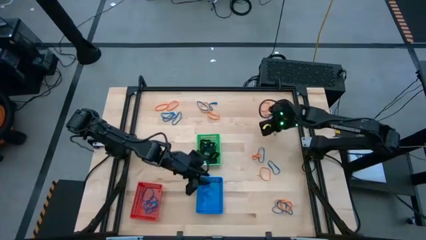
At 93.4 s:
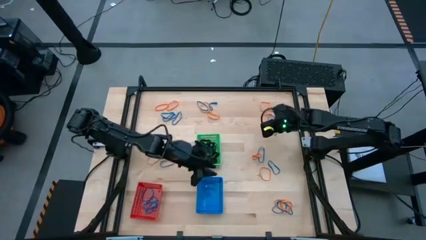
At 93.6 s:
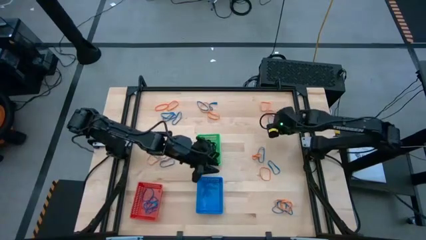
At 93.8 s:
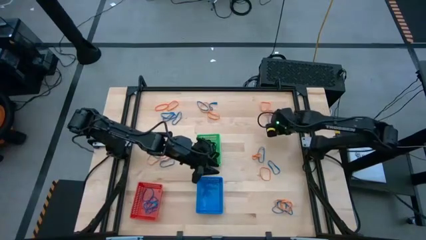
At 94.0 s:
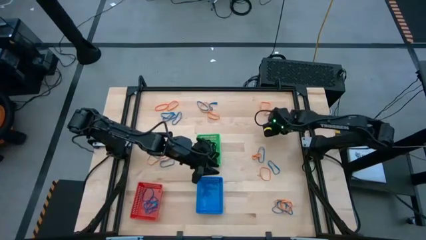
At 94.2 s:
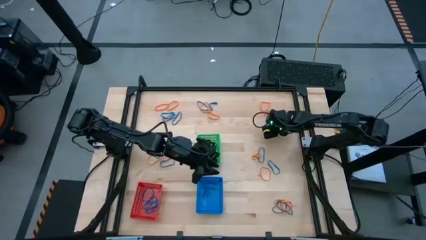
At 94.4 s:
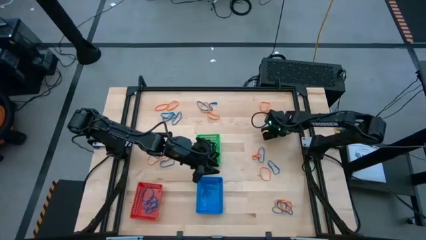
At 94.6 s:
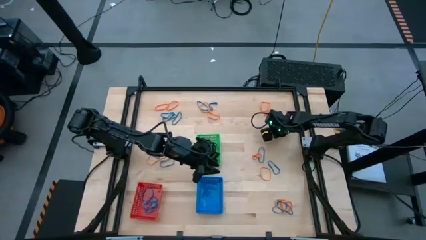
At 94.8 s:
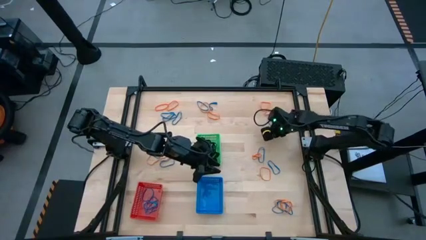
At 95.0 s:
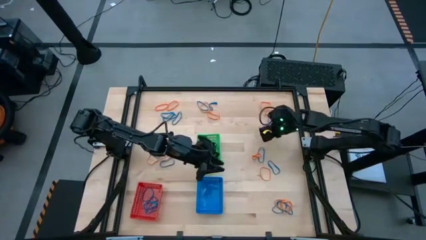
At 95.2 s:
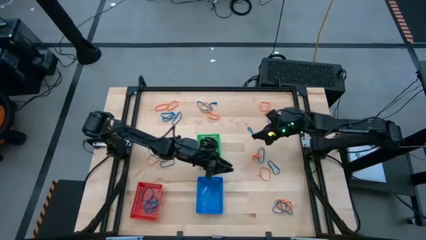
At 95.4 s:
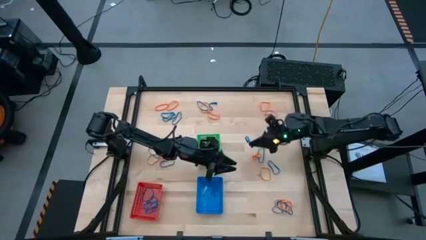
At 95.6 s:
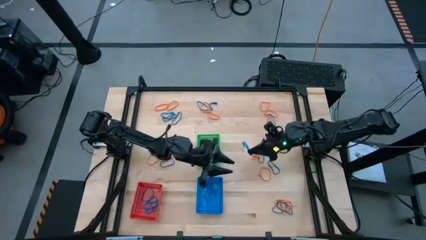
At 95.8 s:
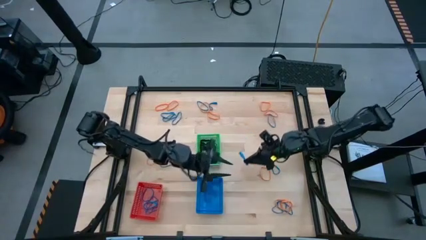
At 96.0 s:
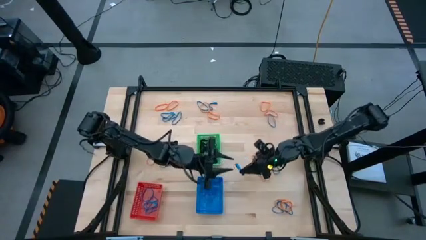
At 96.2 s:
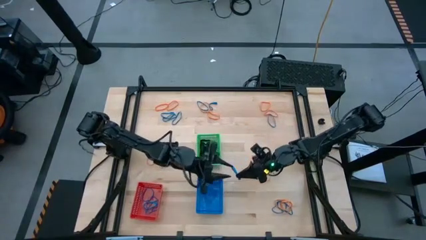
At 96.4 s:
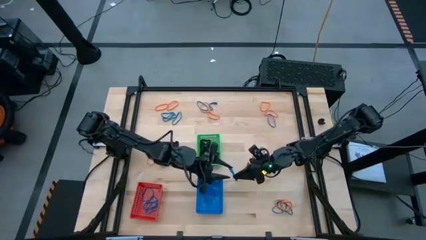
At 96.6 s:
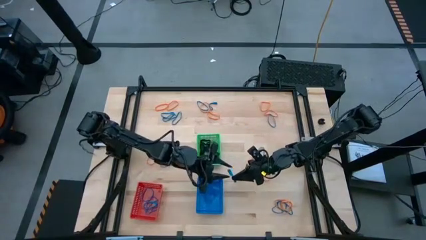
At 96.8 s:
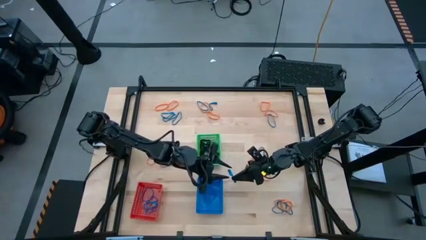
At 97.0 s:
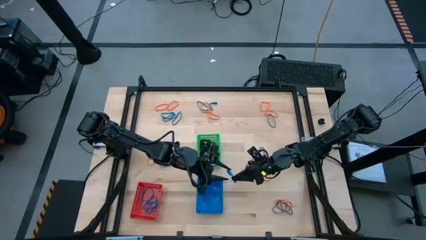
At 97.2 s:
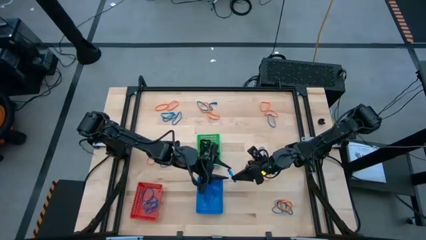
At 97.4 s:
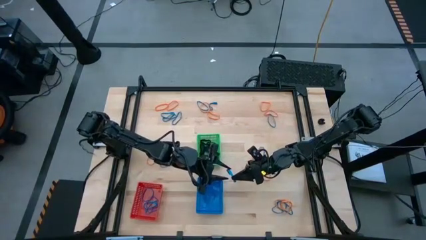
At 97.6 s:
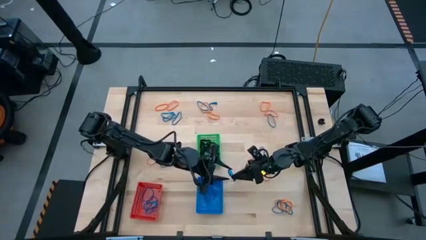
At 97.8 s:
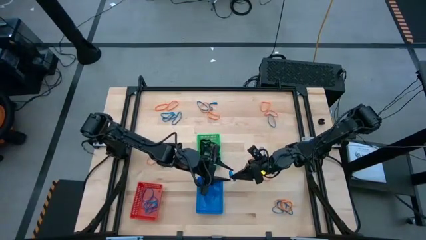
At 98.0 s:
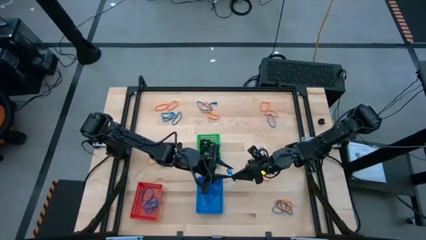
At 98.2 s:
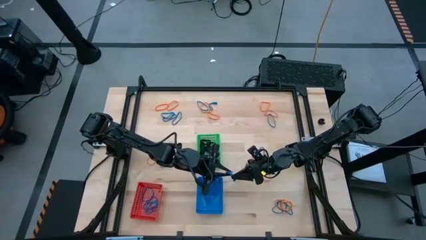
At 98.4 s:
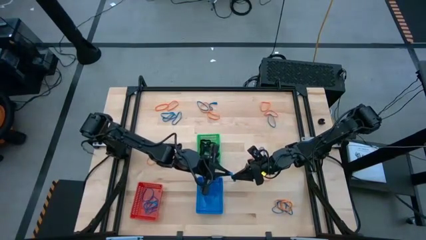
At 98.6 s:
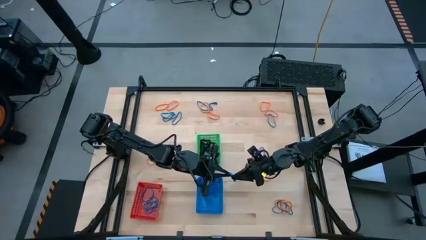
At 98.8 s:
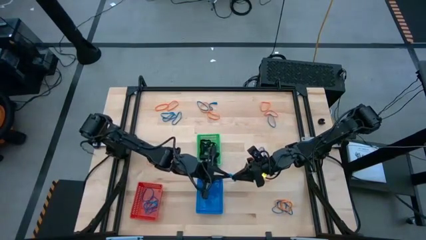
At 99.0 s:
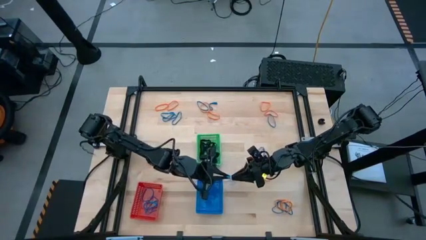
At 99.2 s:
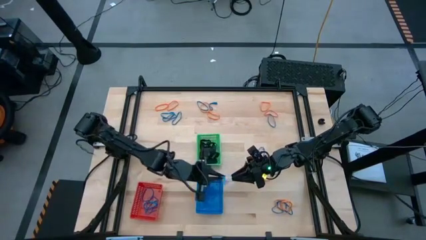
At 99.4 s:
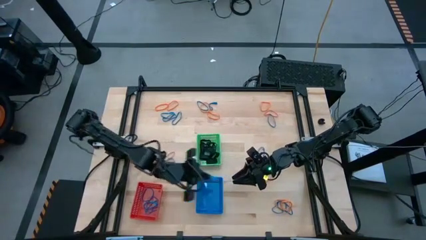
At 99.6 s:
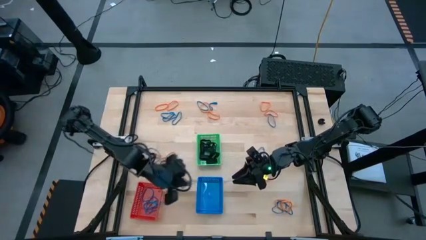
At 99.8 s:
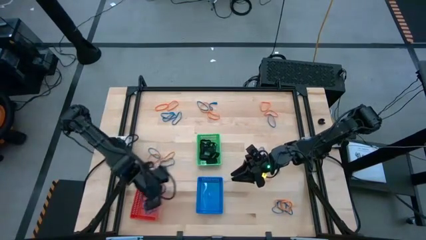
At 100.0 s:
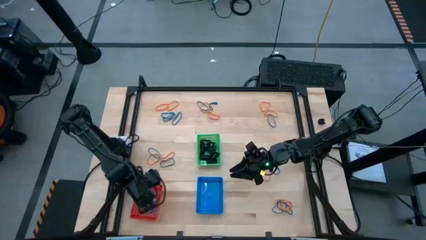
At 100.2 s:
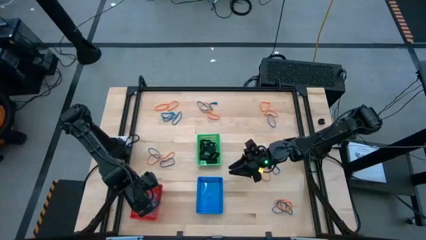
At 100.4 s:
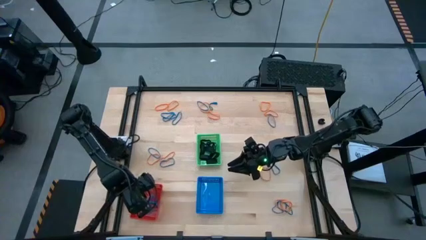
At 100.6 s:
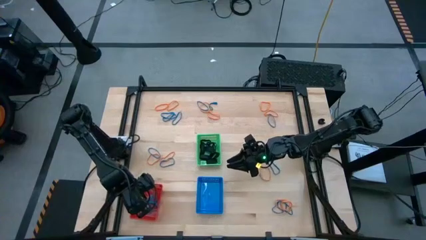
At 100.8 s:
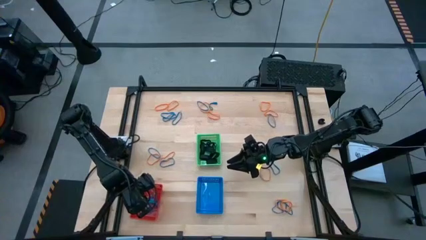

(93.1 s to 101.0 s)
Task: Sort rubber bands into baskets
Put the blue rubberband into the red bin

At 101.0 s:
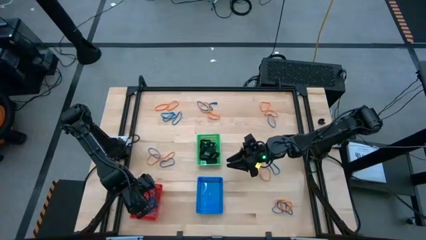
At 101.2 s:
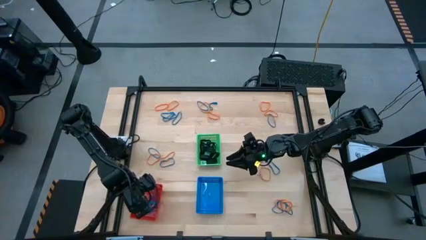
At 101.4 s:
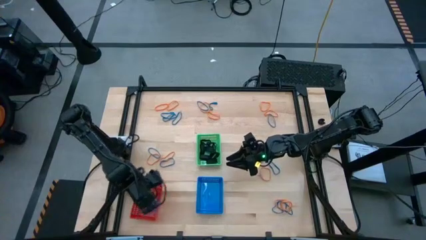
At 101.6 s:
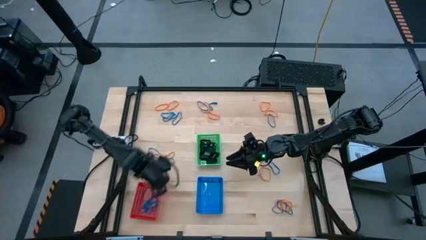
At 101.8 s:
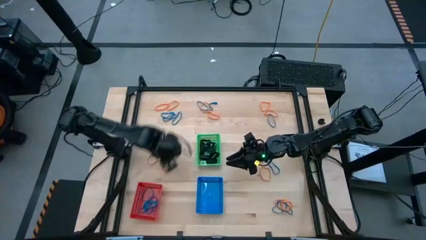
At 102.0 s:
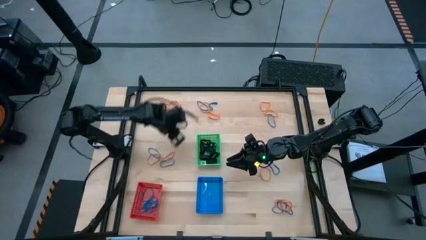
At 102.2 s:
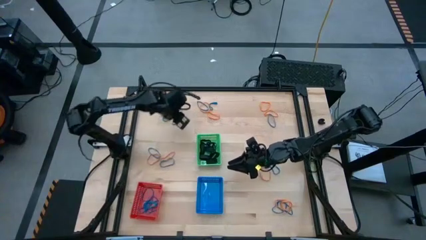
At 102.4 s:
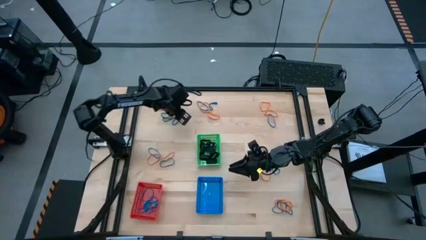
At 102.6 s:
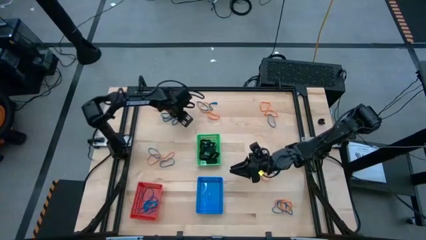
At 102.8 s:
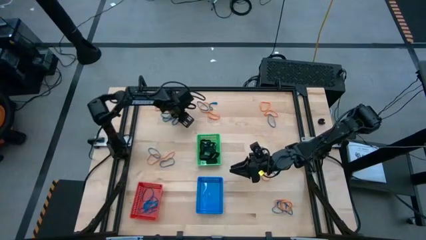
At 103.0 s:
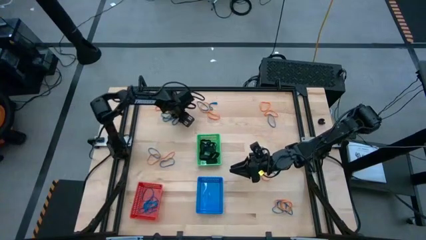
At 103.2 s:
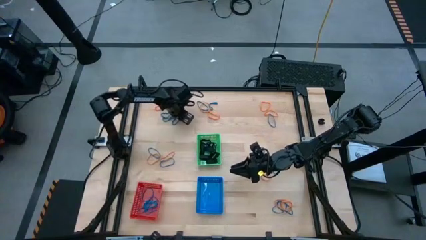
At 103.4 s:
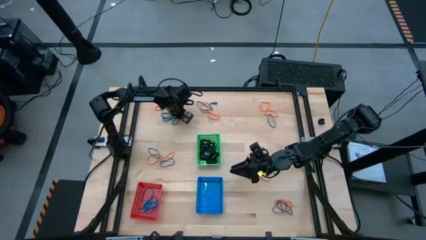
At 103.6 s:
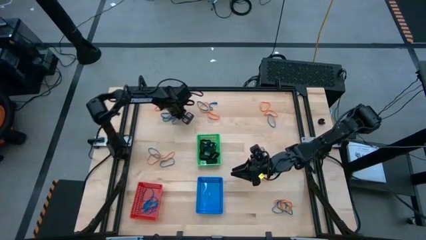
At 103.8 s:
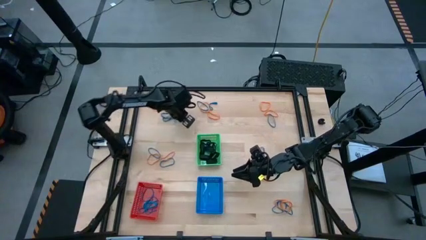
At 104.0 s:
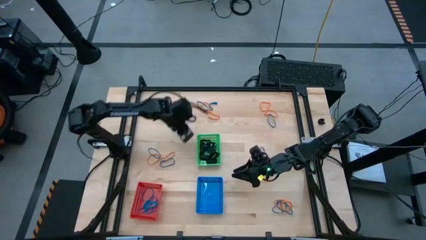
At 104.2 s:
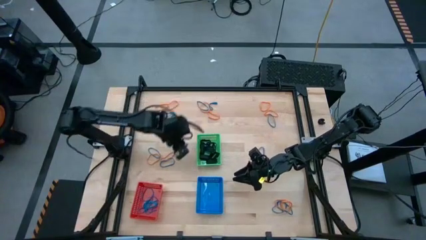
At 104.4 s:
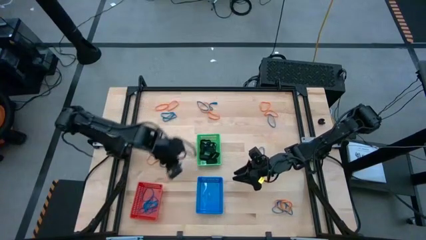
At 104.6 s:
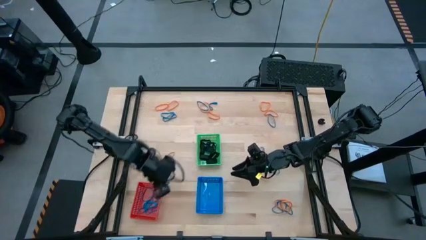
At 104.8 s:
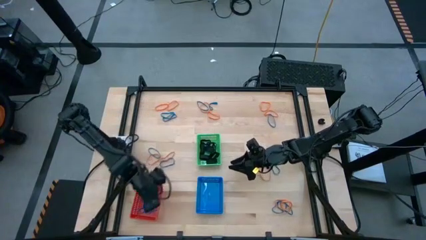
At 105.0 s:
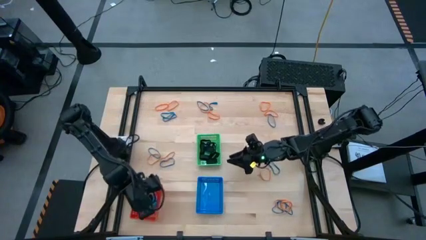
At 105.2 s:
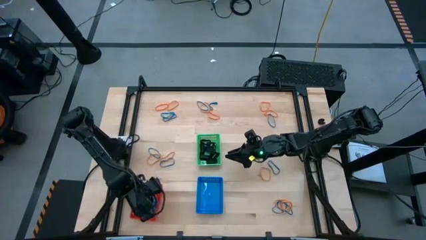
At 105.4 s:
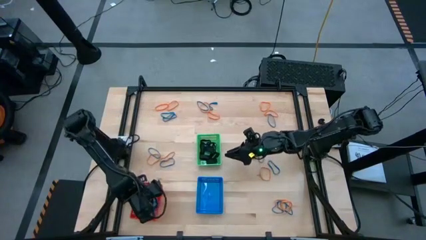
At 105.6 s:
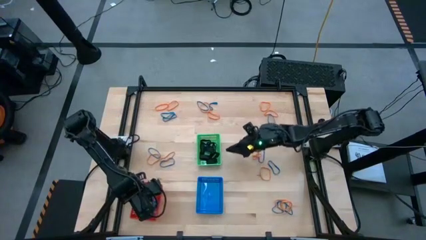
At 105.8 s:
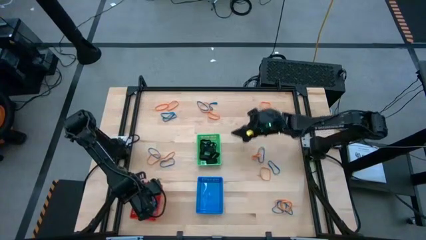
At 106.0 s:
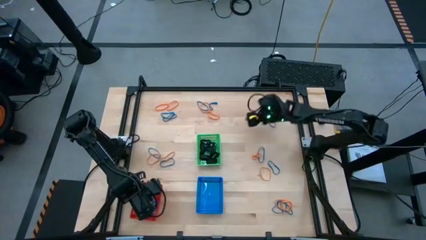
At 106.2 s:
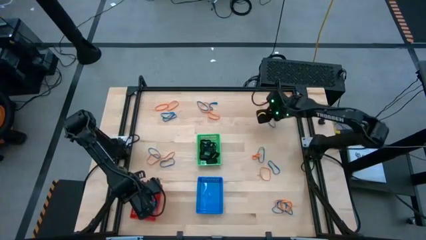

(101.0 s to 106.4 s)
Put the blue rubberband into the red bin

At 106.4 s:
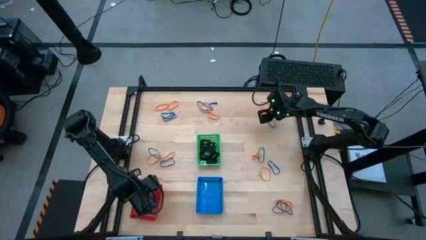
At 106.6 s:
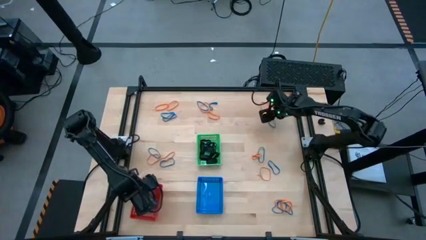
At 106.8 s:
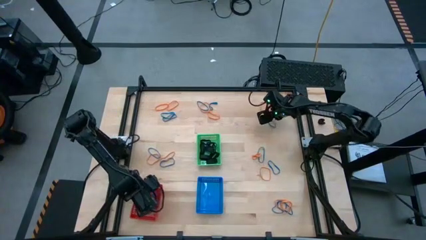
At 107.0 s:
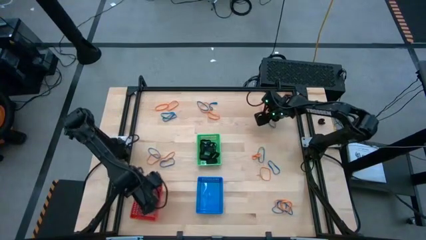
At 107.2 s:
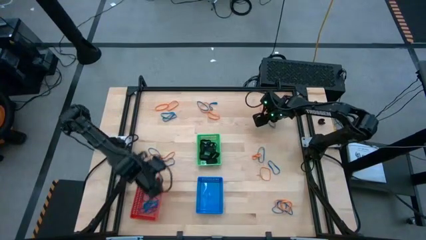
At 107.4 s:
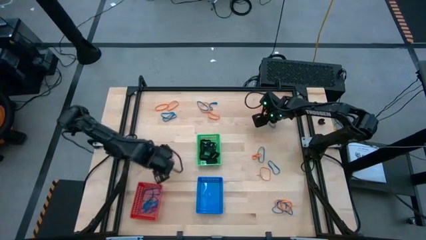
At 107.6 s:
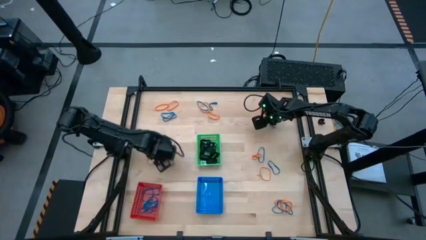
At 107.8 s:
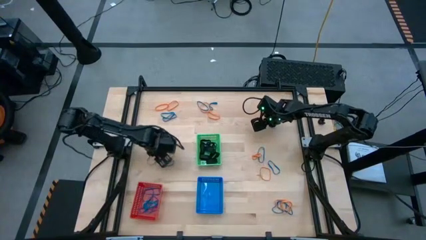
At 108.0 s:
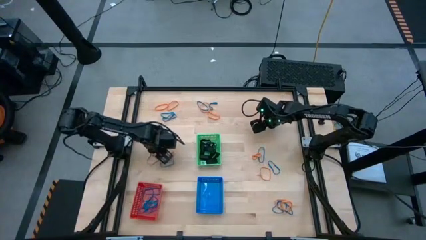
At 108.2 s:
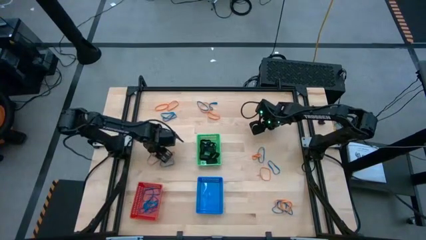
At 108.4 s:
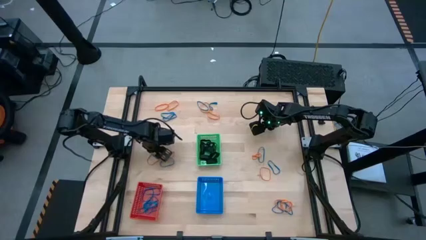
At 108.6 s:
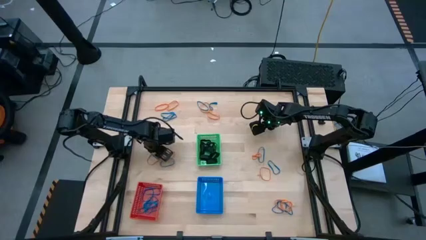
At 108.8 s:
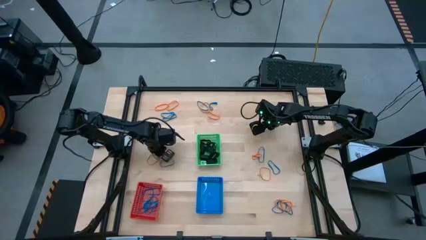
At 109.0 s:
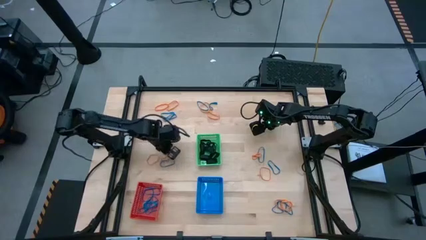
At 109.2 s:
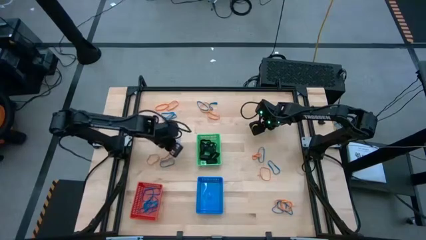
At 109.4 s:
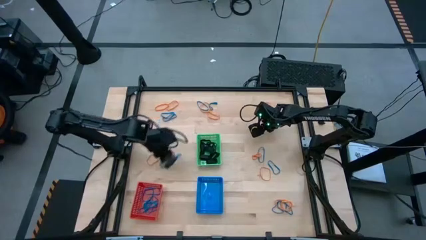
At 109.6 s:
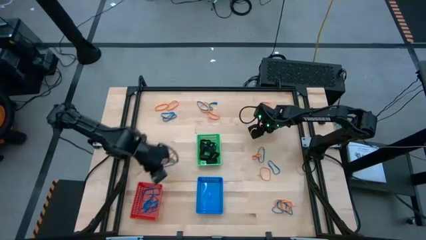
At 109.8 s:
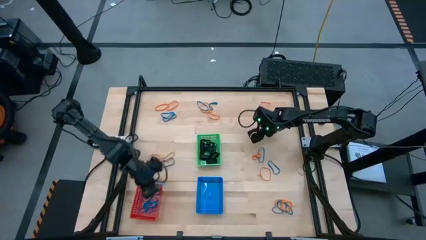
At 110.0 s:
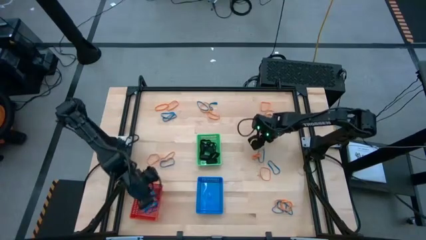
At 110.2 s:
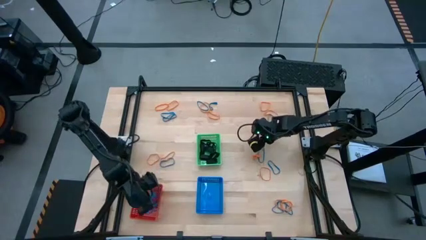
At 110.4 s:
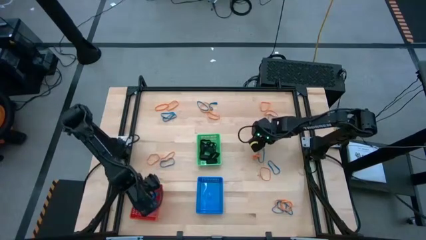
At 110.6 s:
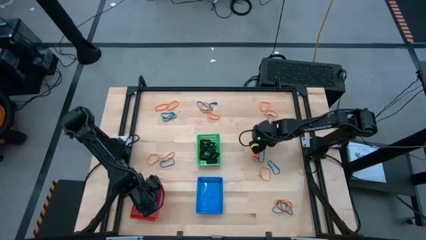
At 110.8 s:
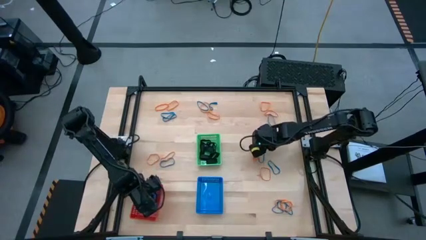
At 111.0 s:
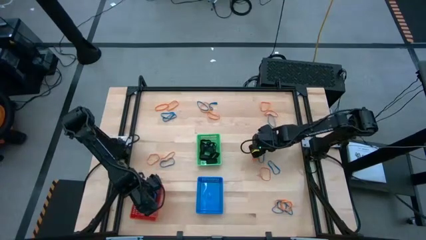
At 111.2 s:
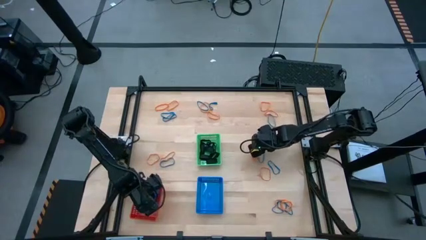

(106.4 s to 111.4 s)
Put the blue rubberband into the red bin
